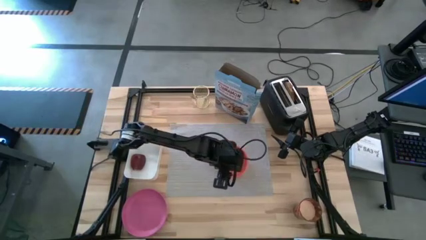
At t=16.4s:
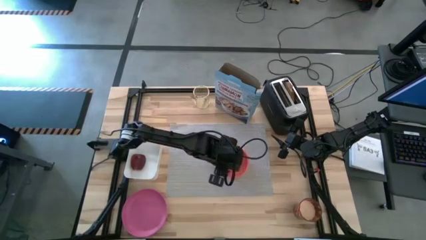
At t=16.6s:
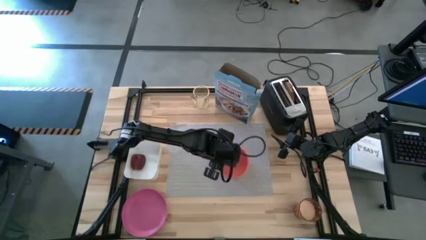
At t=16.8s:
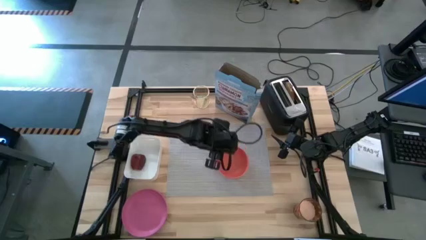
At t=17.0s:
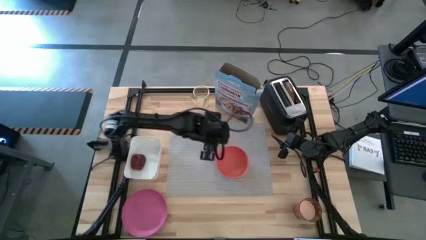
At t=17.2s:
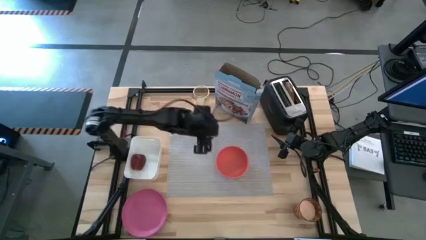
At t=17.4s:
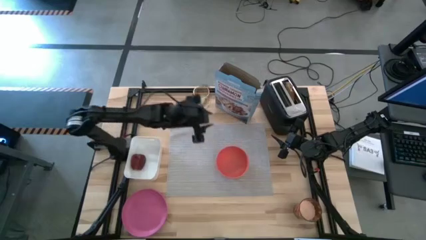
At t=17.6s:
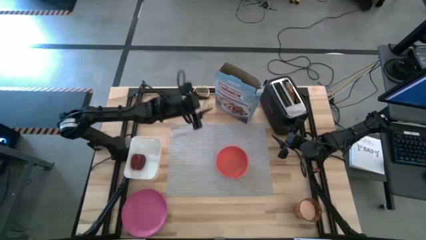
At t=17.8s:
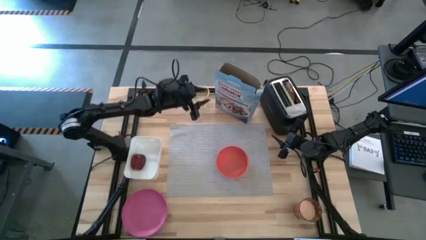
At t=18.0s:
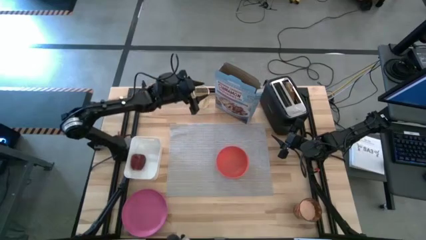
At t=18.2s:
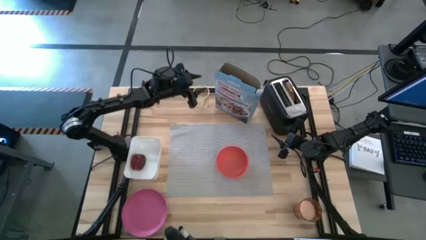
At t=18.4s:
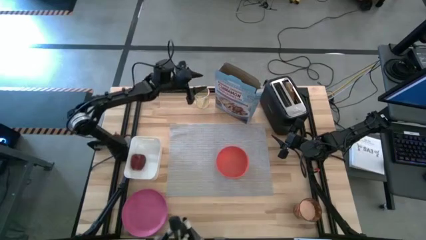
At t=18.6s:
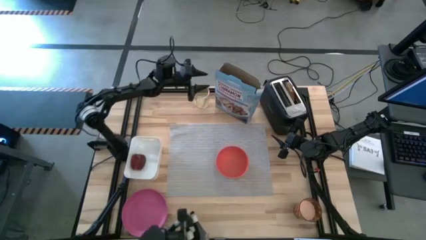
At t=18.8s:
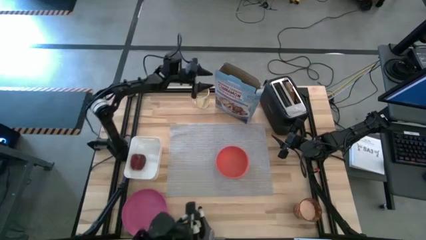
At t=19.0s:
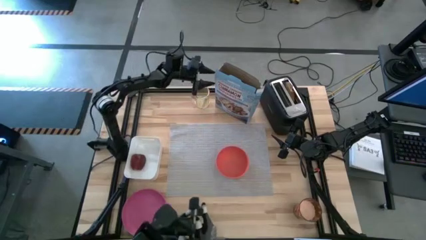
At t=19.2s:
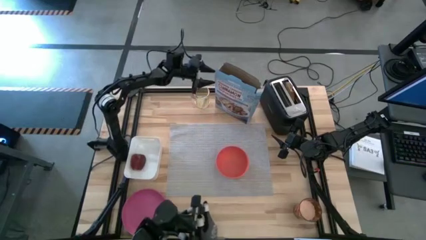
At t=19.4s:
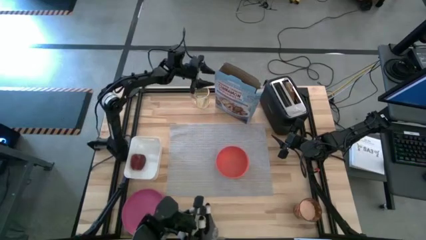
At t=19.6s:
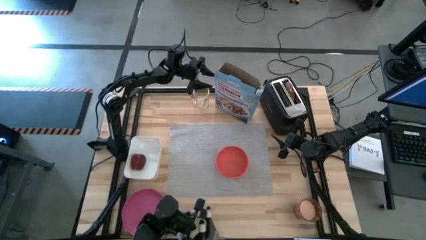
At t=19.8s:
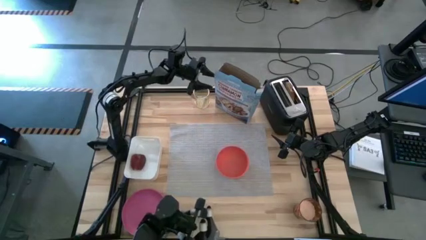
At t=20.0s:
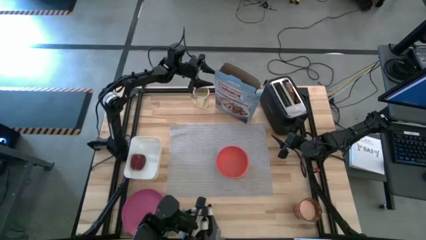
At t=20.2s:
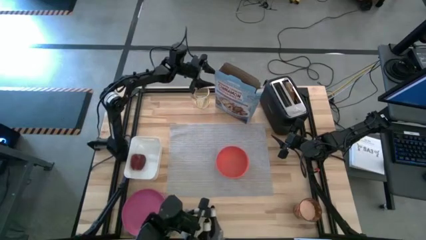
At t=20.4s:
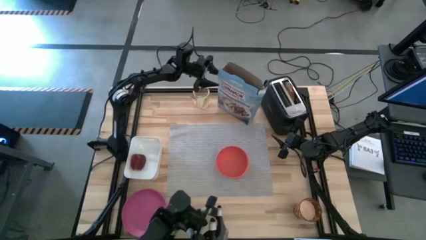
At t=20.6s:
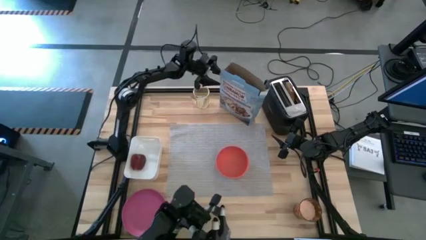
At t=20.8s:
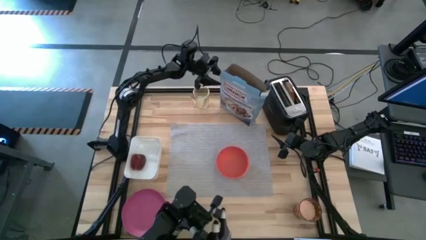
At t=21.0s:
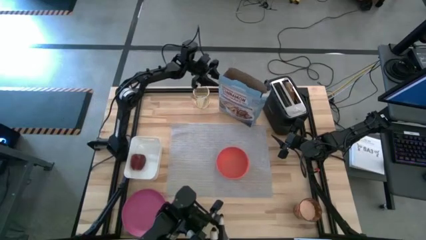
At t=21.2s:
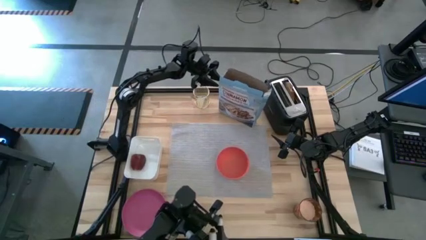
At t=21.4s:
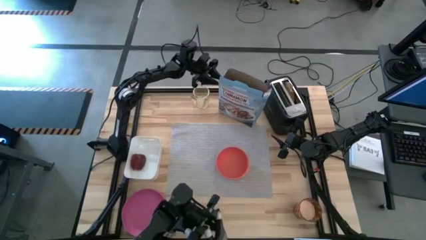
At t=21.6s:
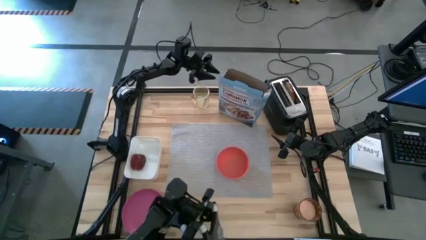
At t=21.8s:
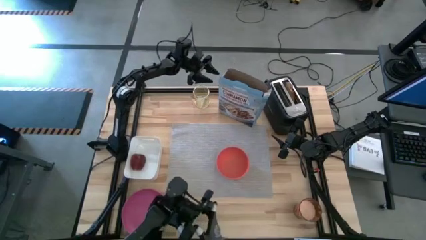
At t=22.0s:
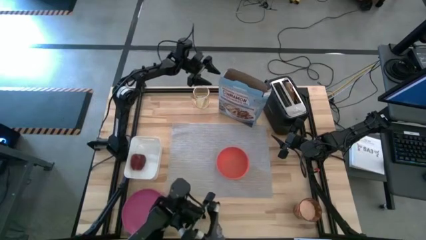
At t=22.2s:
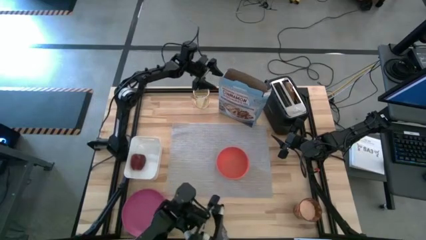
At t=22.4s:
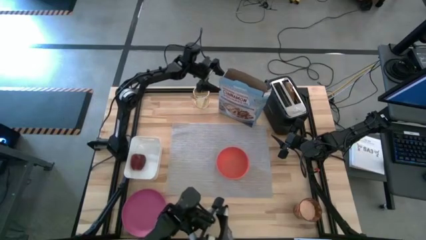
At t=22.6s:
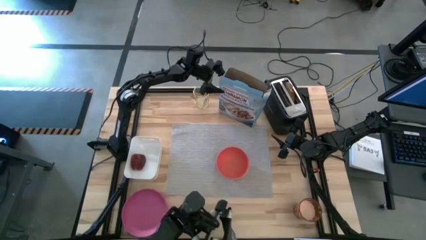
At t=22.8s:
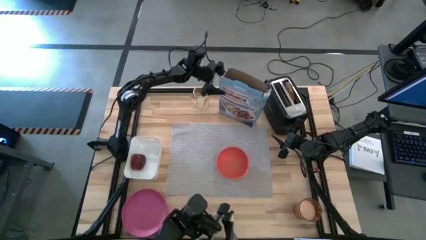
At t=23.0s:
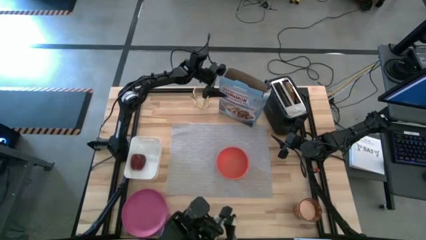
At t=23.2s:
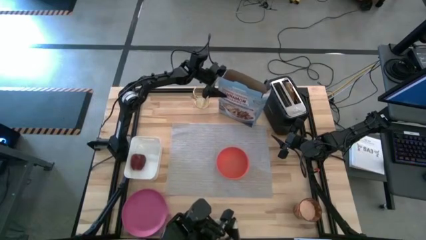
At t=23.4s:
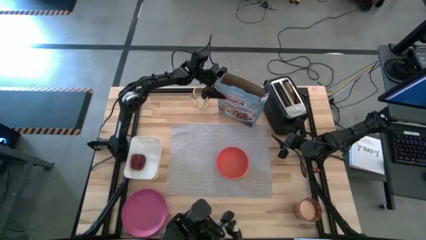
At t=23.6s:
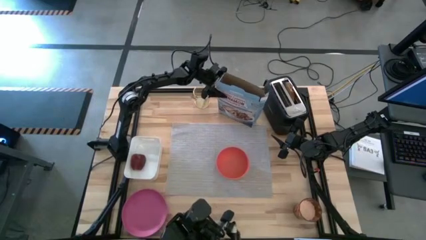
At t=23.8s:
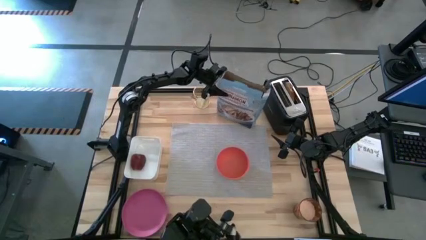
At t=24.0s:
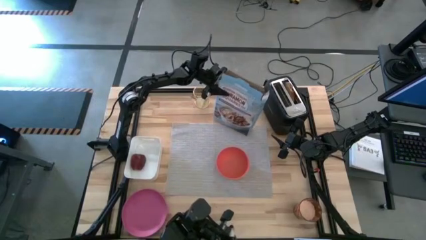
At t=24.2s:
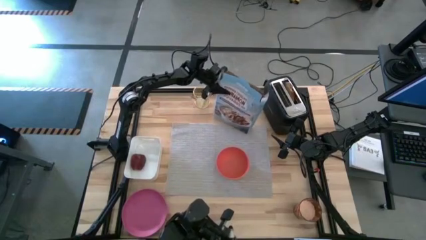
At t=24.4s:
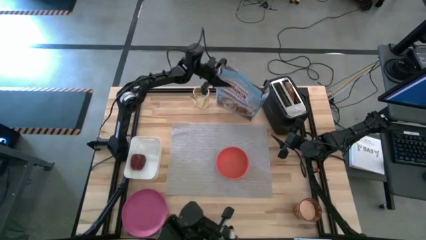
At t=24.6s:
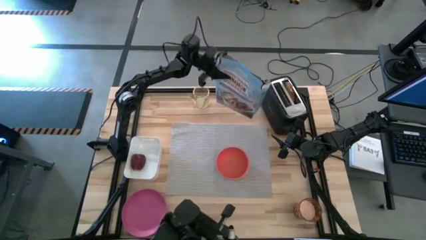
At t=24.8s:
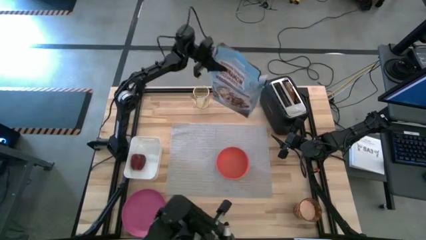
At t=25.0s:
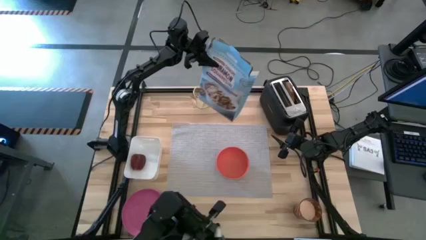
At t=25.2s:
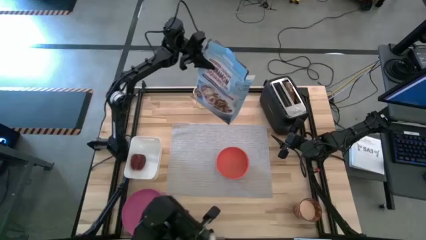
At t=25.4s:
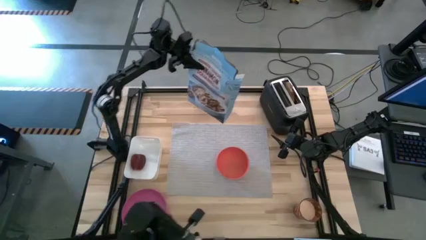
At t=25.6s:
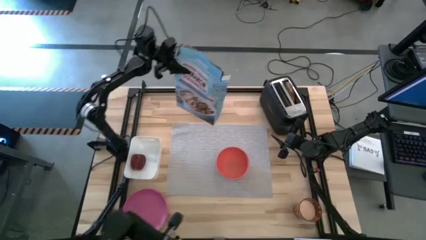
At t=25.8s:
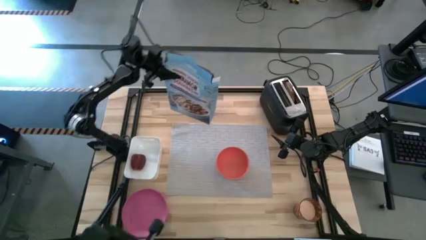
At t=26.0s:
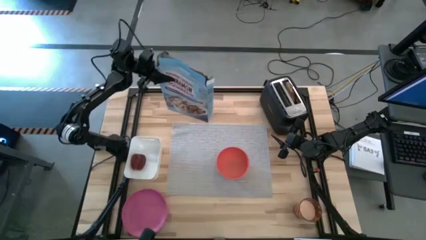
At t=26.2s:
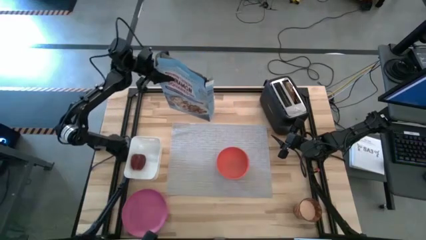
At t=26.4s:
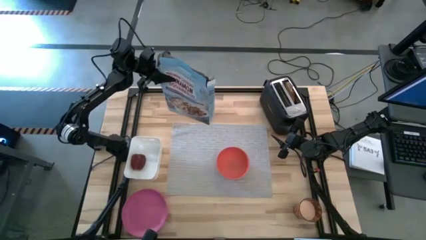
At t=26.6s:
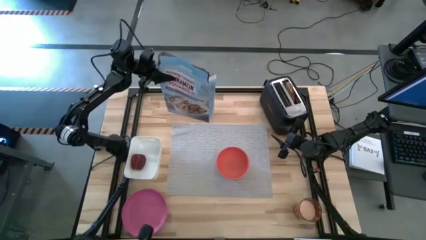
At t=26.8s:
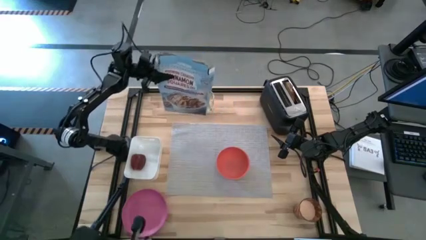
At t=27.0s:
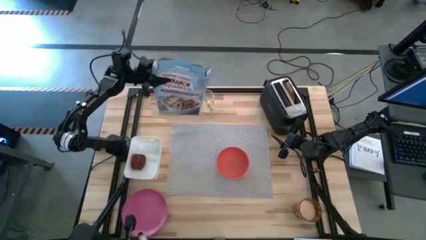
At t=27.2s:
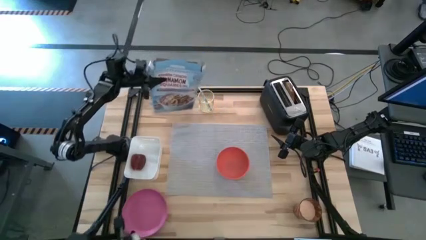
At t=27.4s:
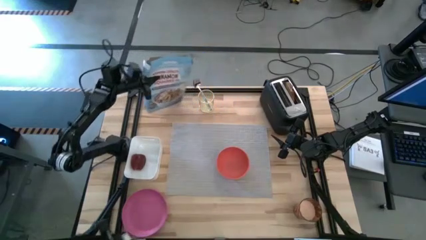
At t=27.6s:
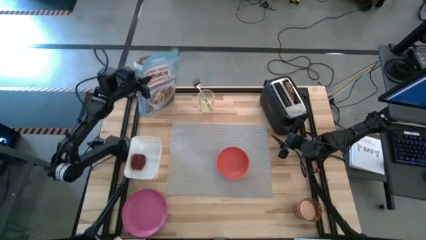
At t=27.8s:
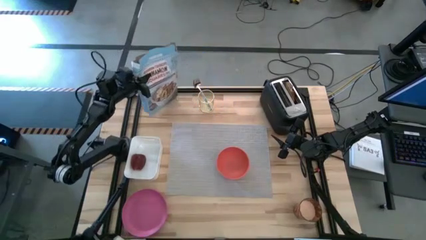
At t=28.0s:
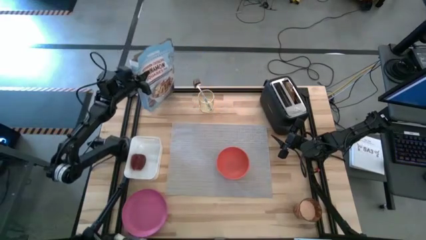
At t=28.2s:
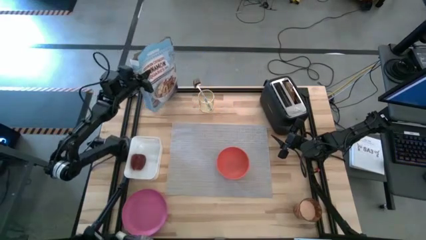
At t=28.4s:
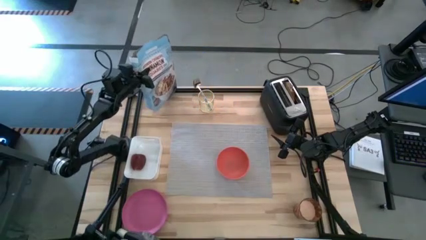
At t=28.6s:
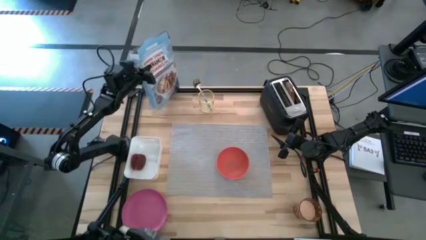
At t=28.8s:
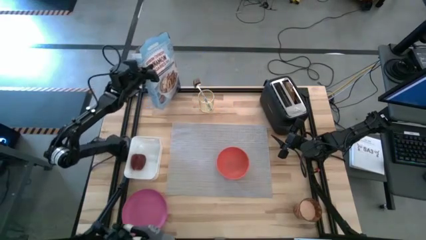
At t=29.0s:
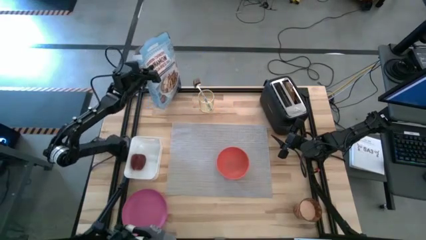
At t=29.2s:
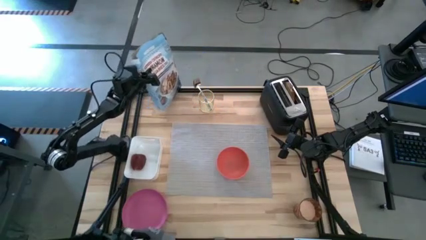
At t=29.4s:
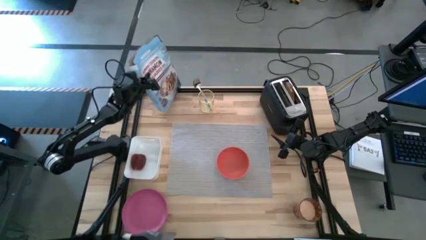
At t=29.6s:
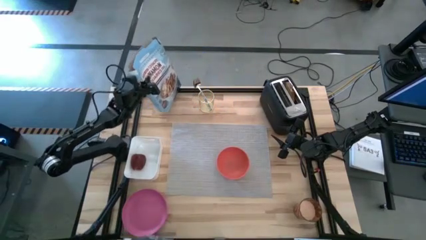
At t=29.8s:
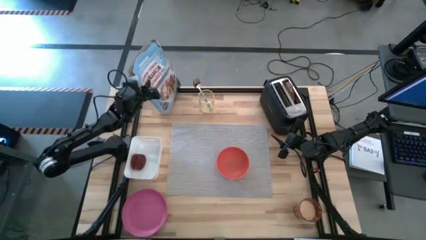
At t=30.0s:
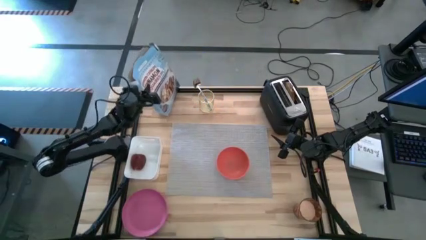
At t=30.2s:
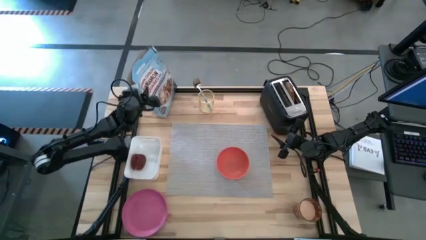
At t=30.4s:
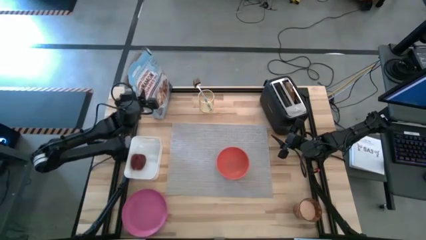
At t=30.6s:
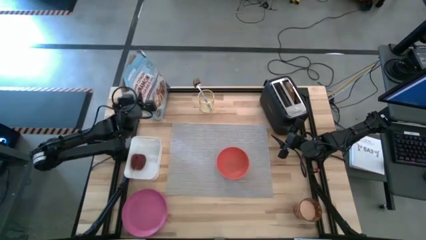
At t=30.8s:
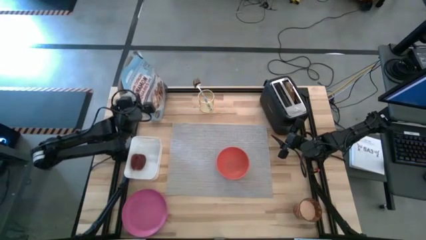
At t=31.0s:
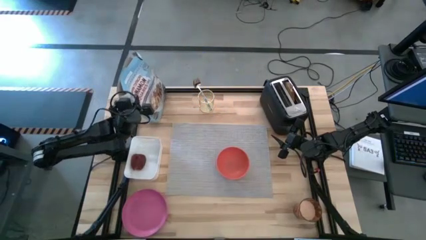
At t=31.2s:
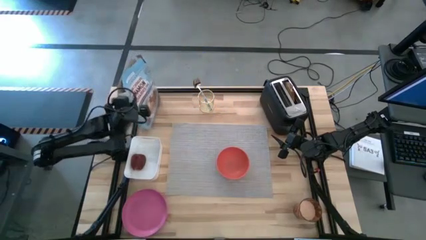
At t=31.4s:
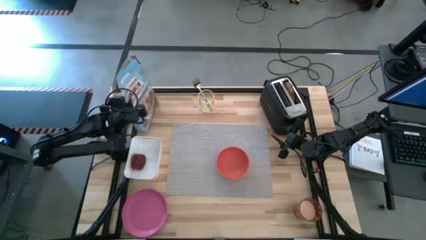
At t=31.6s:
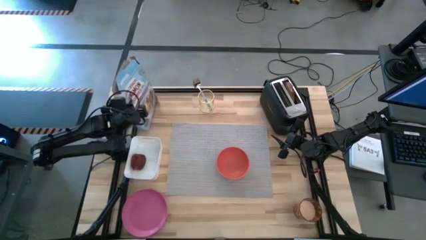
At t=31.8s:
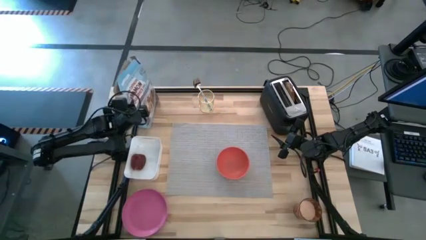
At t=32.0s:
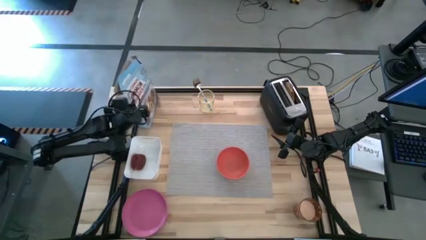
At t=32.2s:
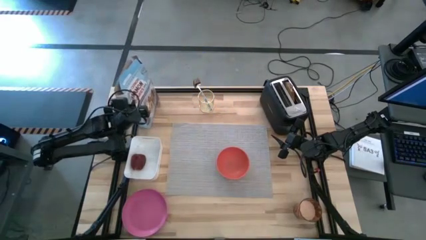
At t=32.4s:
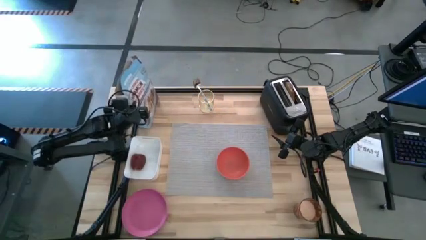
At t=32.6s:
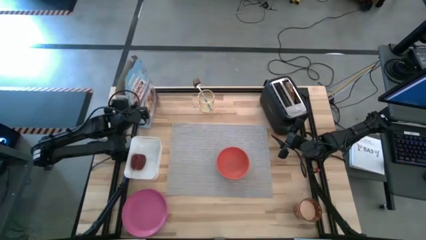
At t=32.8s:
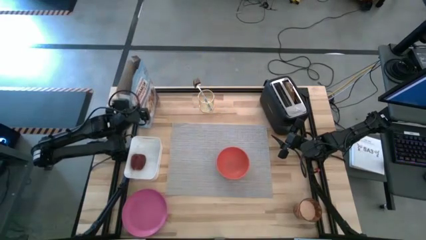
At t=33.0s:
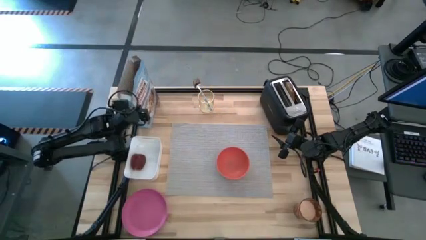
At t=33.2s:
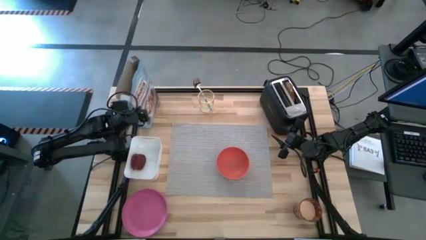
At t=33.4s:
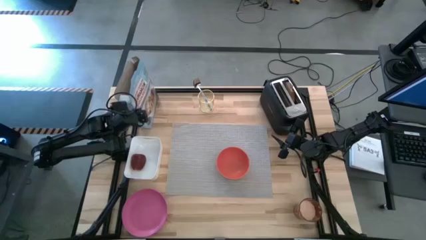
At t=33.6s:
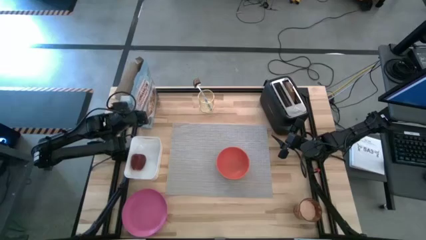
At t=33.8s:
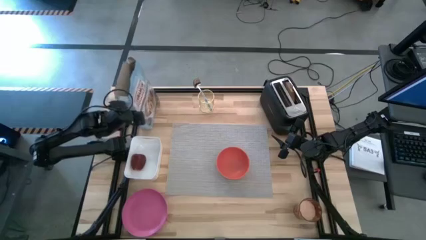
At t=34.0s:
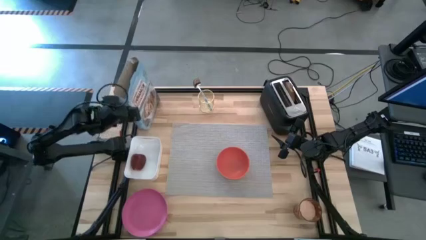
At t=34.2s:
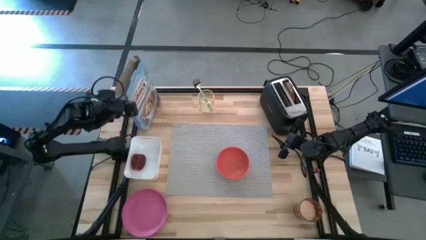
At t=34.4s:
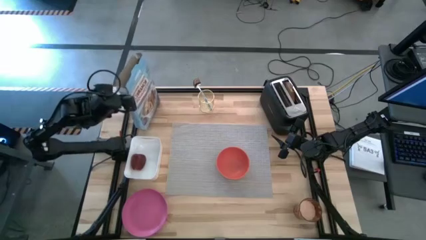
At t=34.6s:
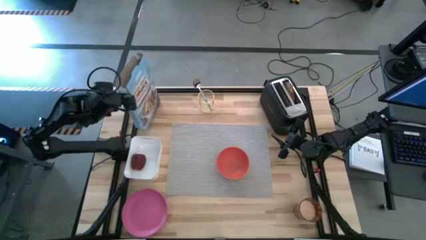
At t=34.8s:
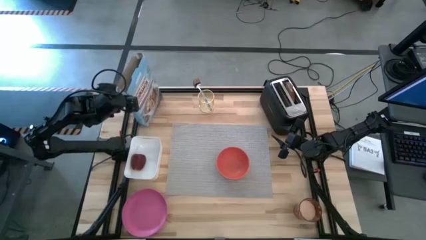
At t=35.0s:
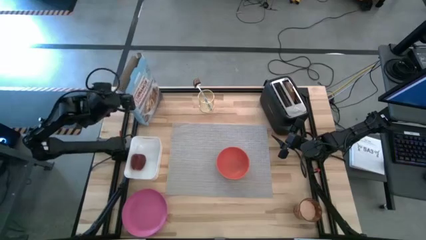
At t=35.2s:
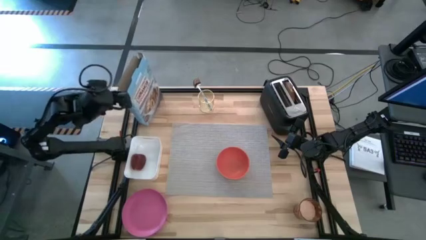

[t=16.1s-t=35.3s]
Task: Arrange a breakfast setting
Move the blue cereal to the top left of the table
